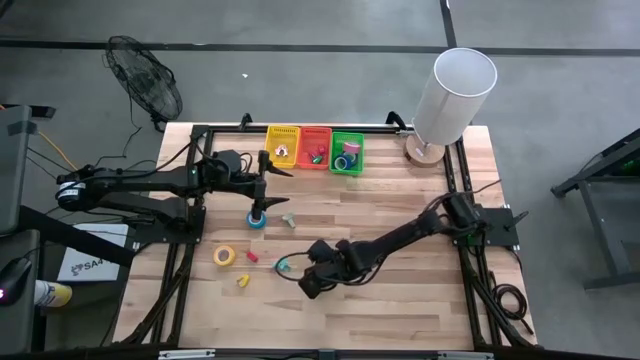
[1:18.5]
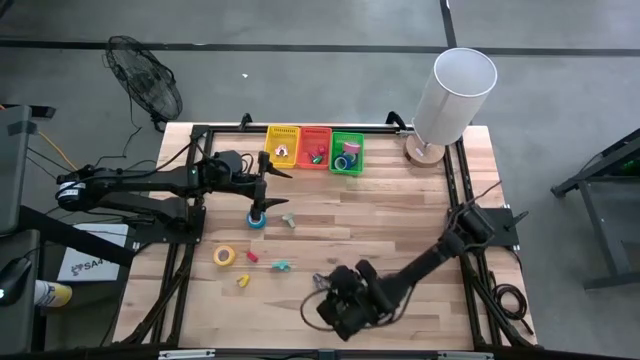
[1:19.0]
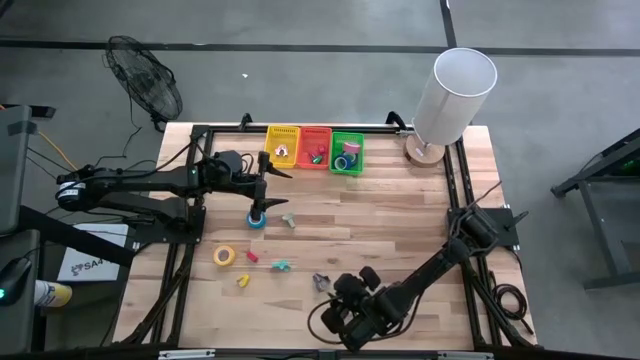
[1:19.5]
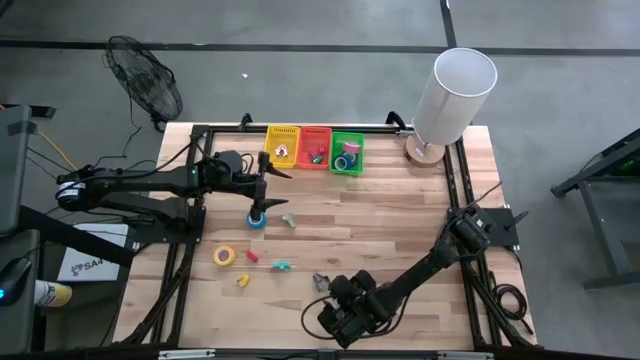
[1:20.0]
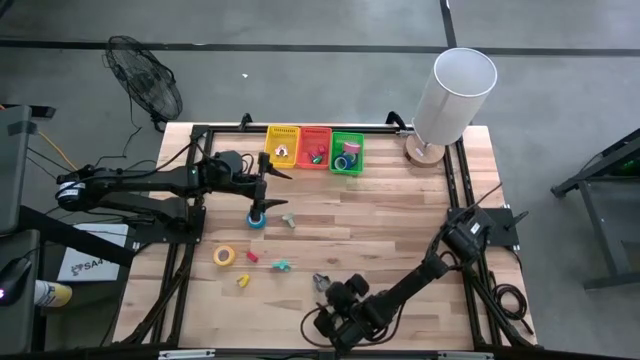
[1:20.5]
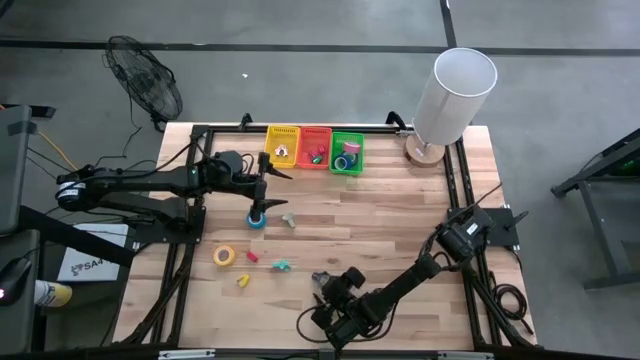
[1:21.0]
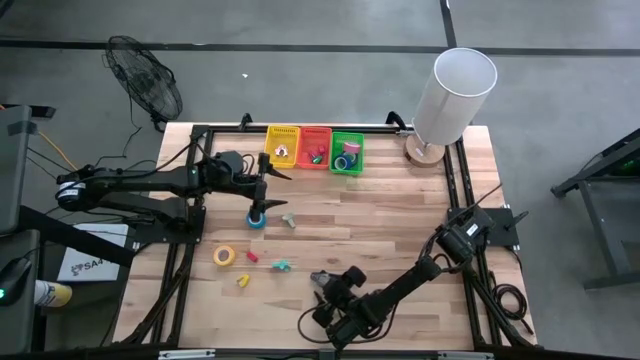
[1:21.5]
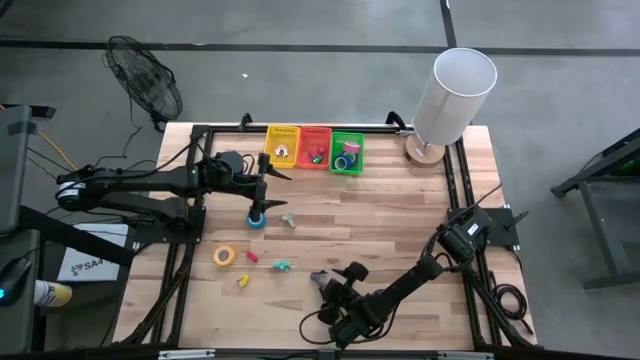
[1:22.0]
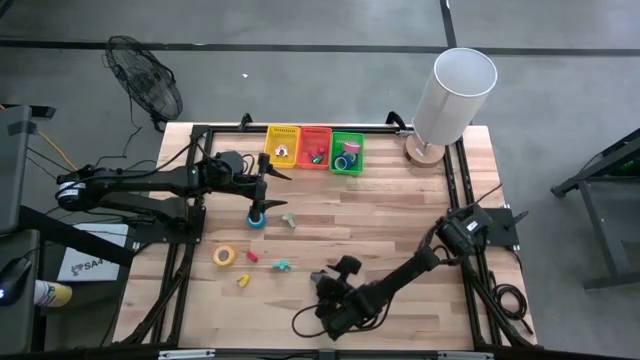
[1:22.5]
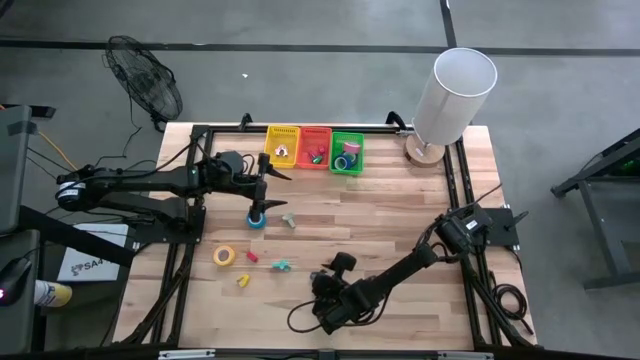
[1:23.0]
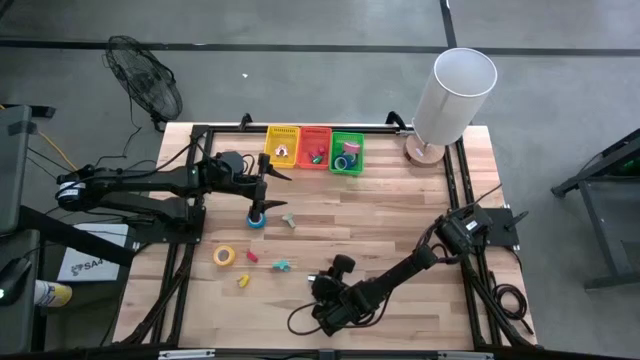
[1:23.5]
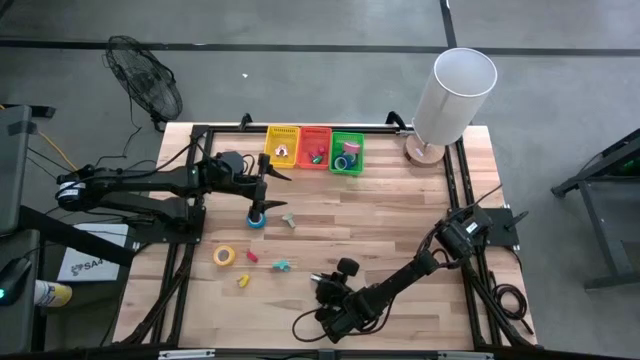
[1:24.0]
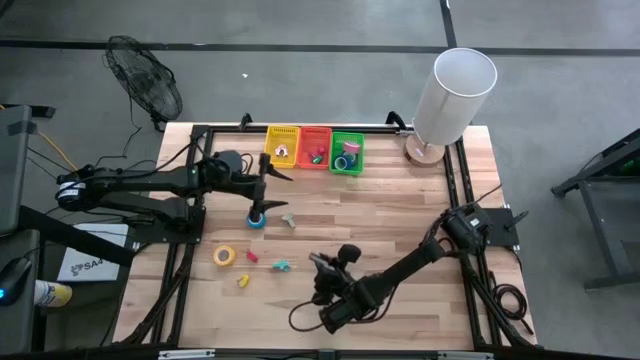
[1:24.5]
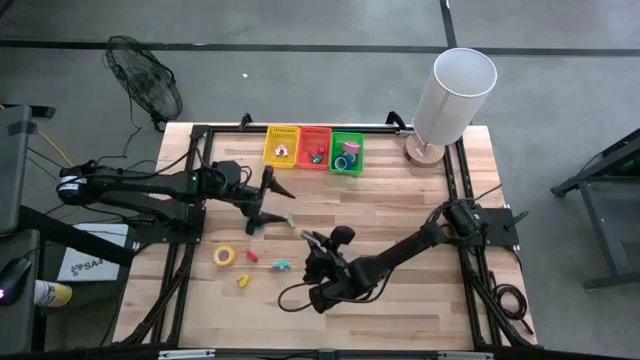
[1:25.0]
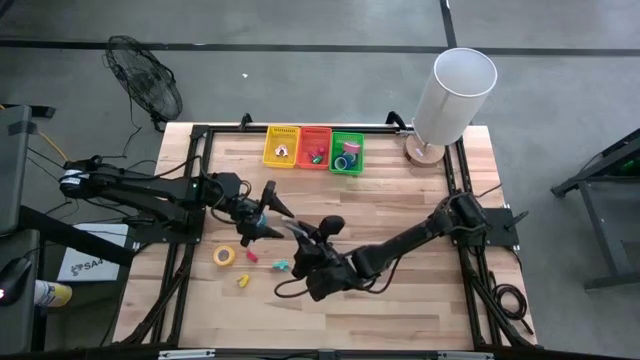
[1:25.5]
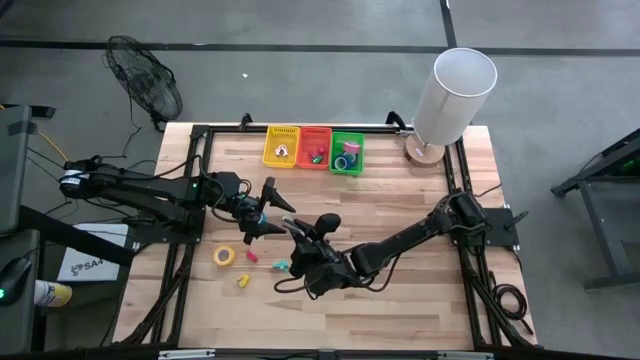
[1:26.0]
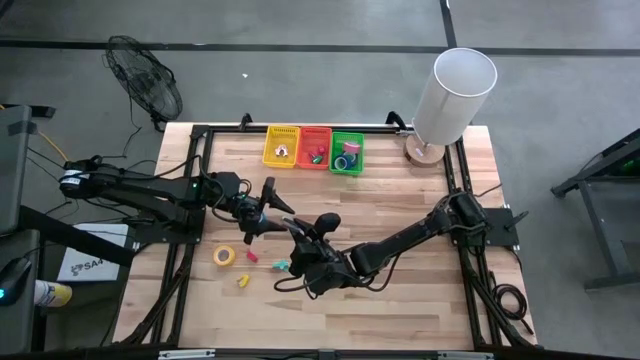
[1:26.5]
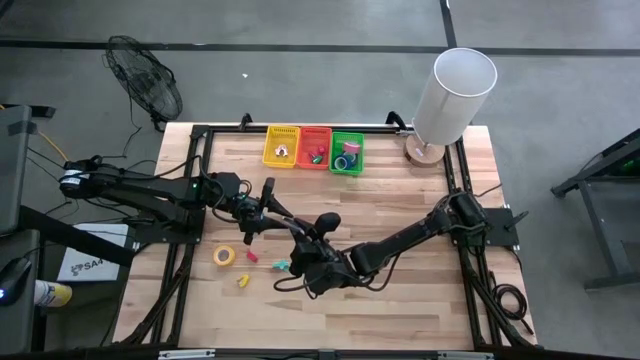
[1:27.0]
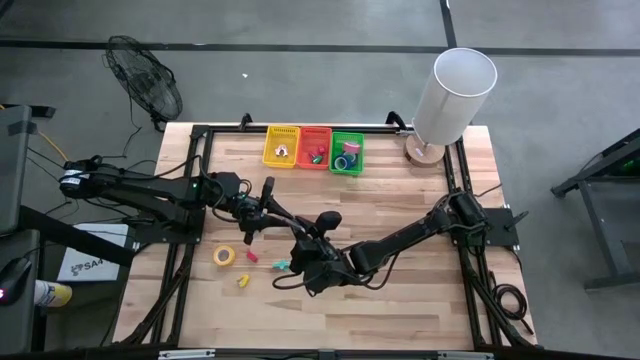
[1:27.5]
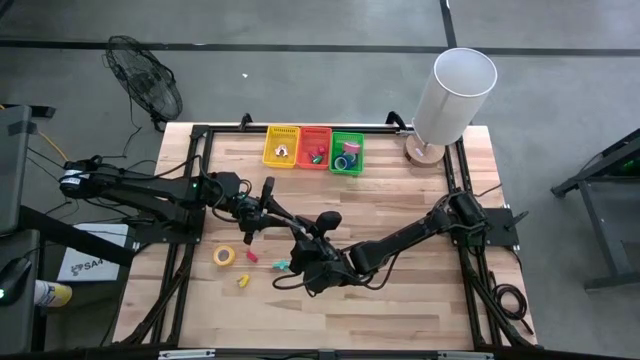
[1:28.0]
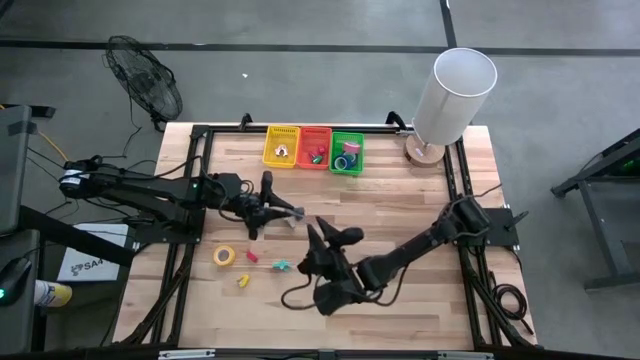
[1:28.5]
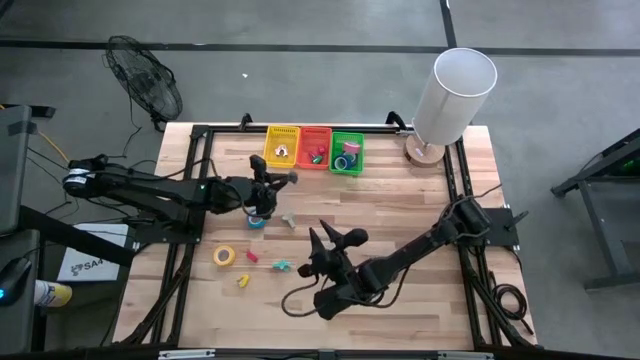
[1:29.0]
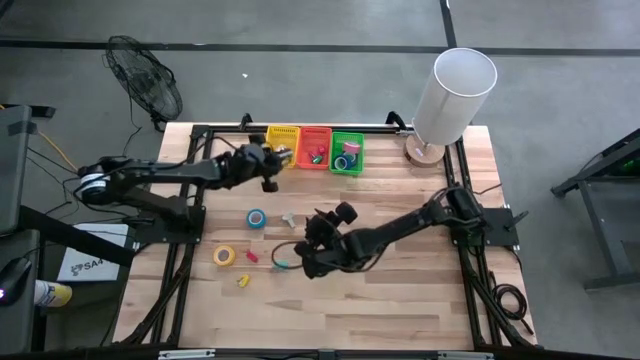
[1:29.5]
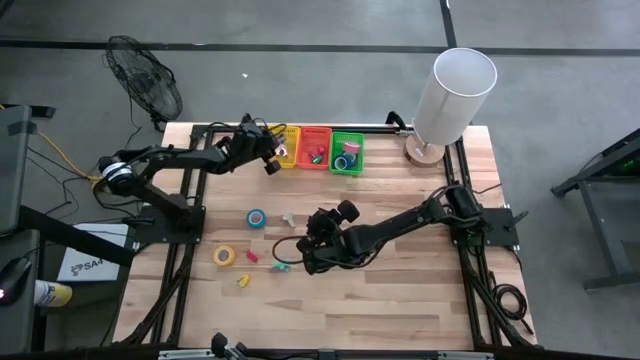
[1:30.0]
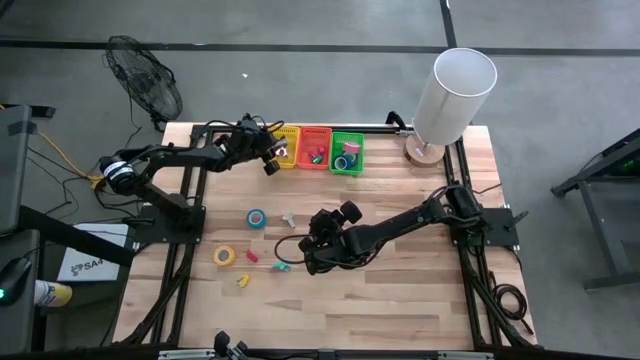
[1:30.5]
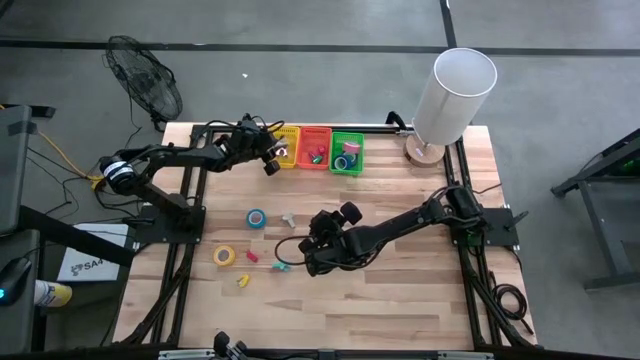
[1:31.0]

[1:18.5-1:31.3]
Task: Pick and place Stapler, Stapler remover, tape
Put the black staple remover into the yellow basket

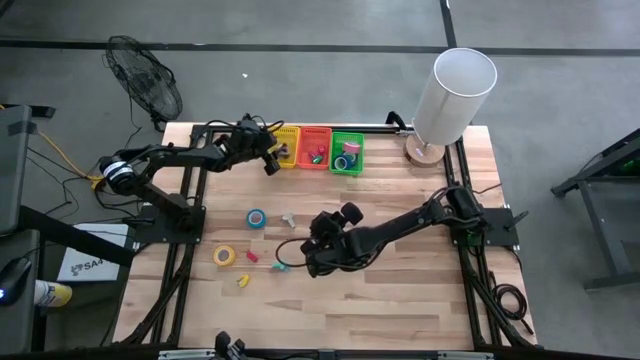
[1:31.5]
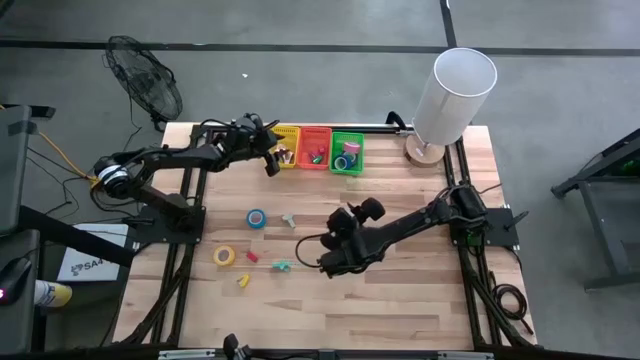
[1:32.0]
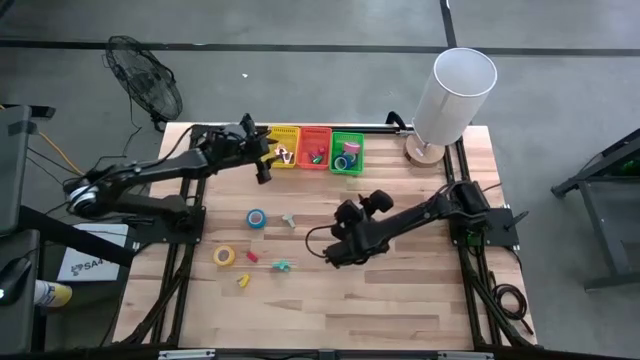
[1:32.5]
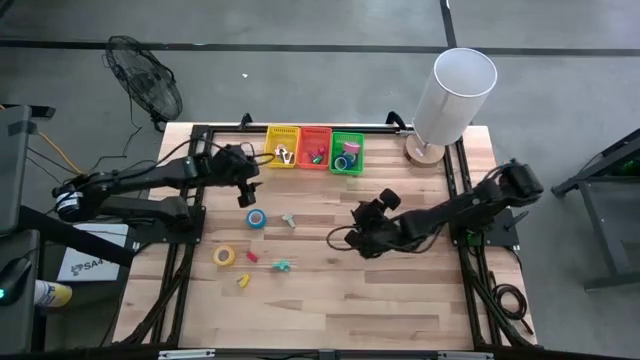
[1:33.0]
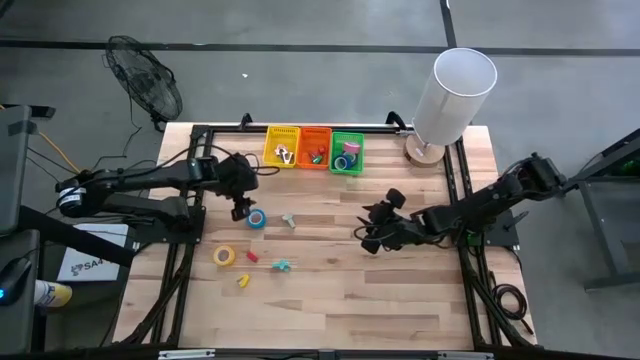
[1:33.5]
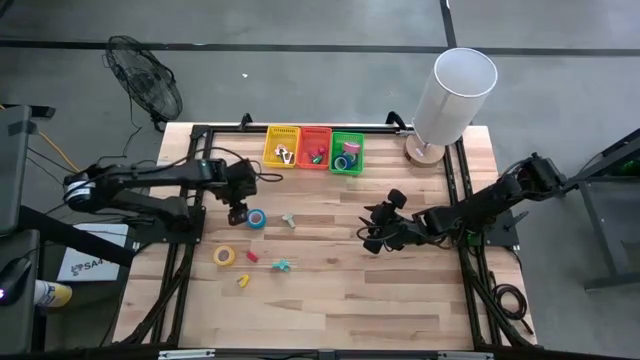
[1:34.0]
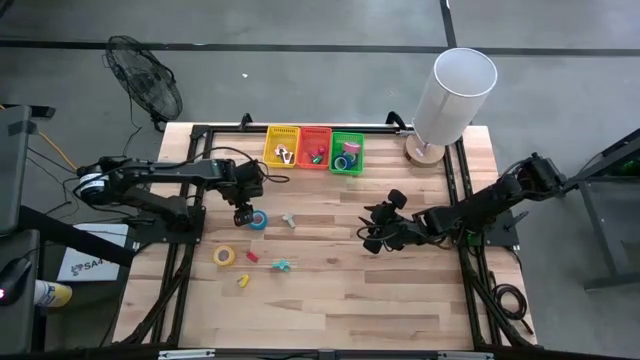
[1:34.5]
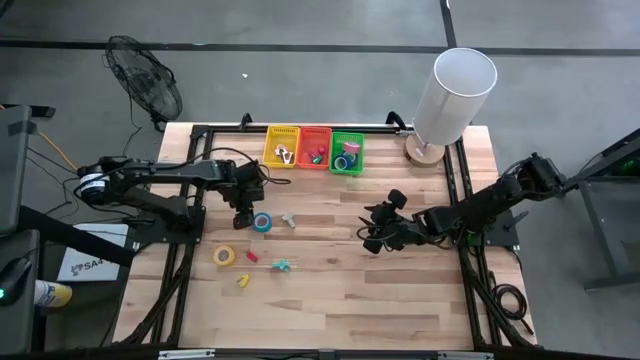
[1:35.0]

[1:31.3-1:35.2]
Put the light blue tape into the green basket

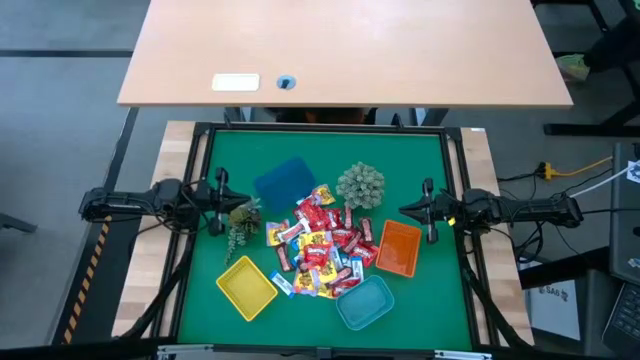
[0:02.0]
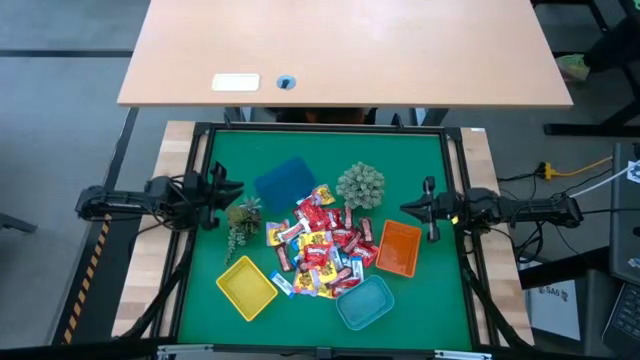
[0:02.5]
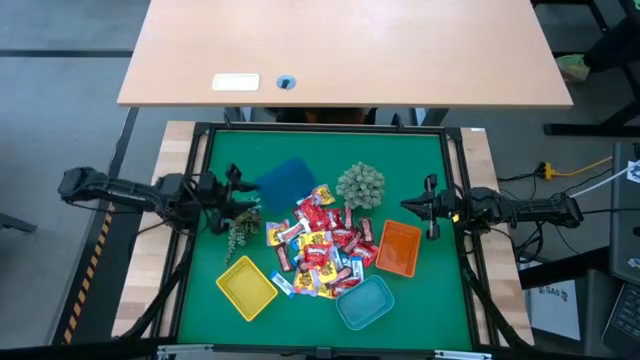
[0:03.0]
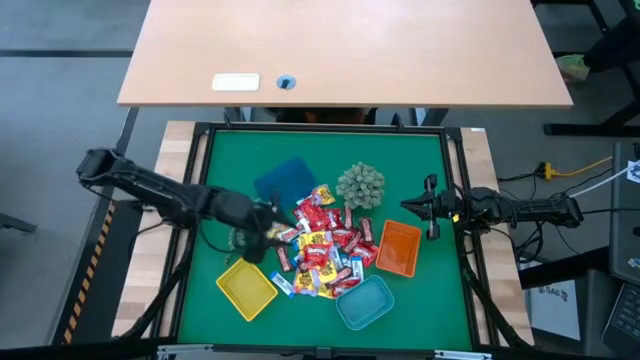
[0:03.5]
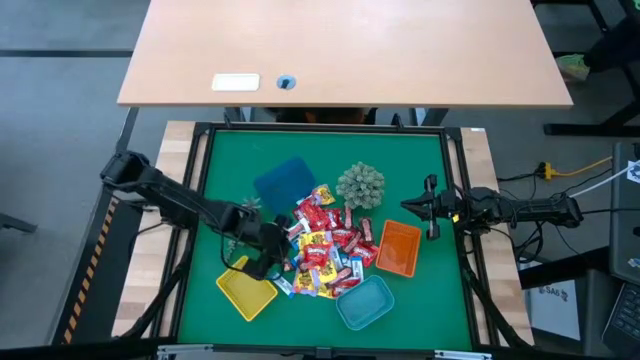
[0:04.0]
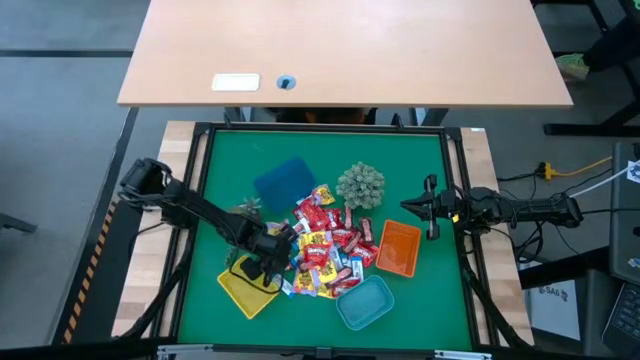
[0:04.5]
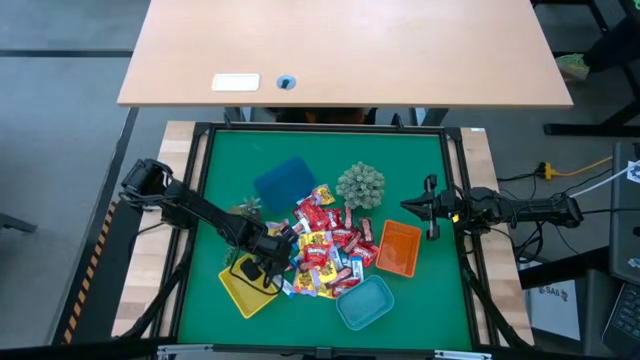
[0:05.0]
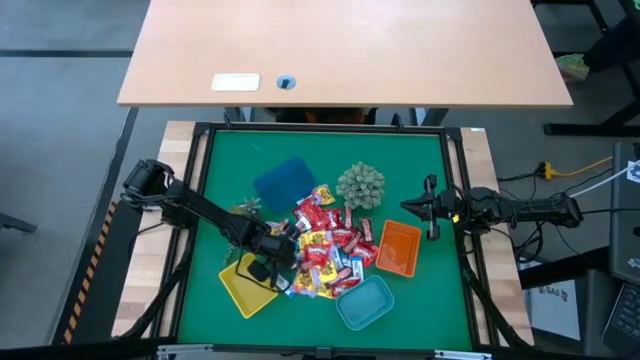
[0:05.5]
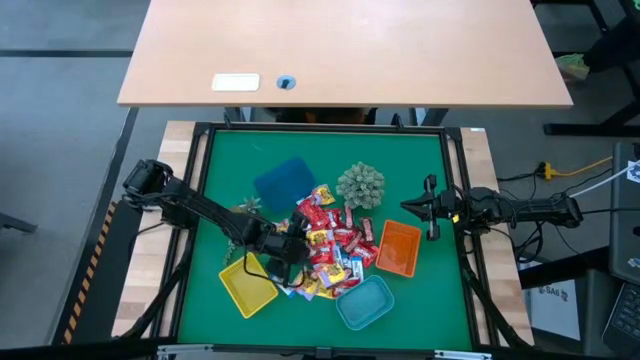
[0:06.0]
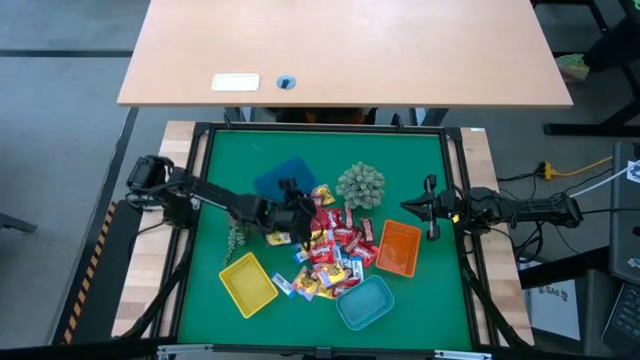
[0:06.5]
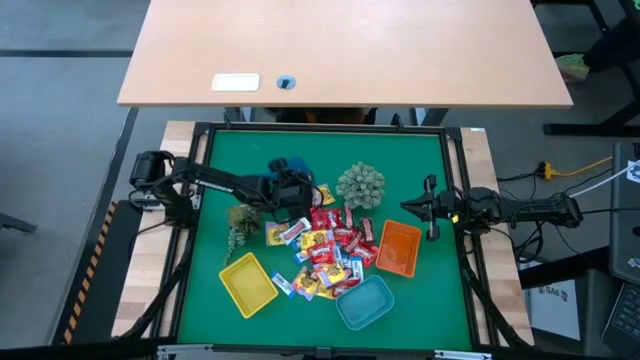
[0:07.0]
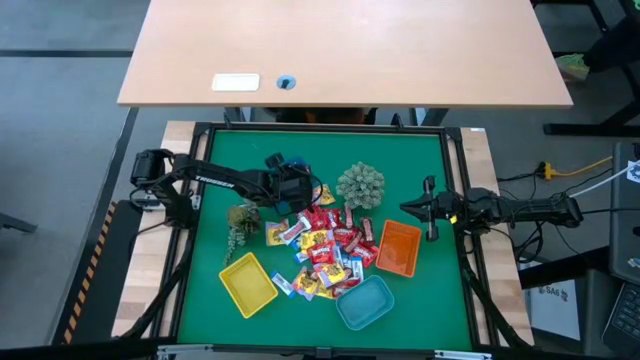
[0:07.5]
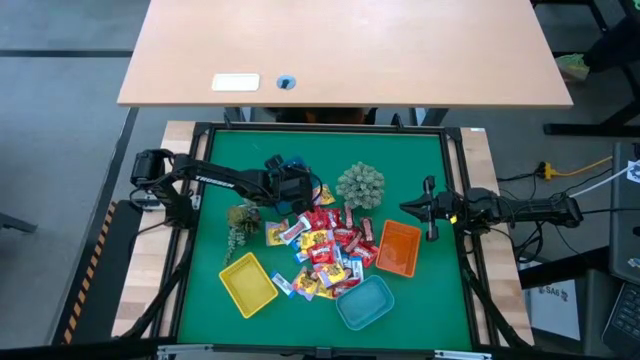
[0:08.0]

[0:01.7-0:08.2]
Task: Sort candy
Put the brown chocolate into the blue bin
